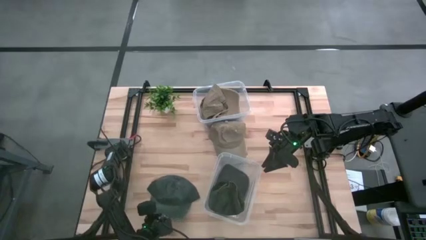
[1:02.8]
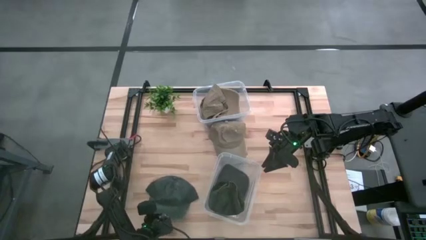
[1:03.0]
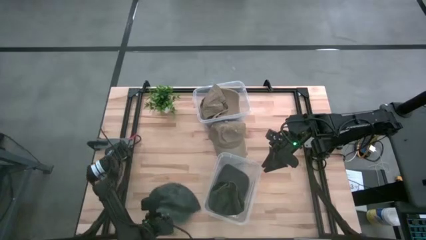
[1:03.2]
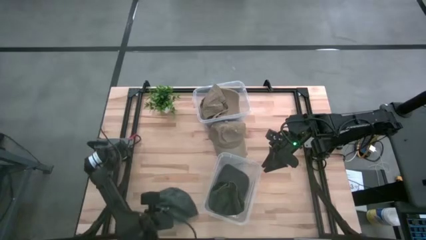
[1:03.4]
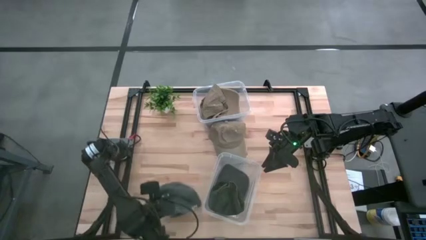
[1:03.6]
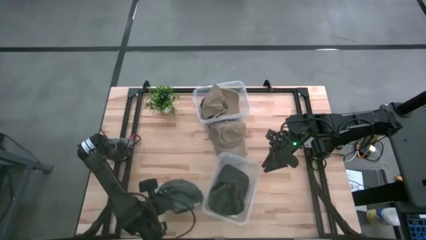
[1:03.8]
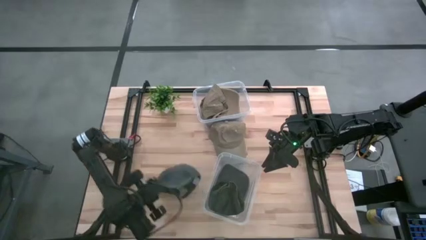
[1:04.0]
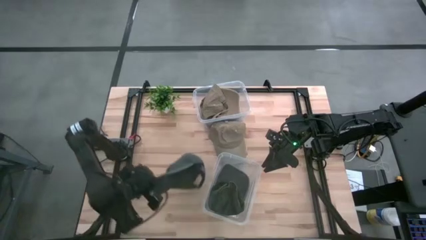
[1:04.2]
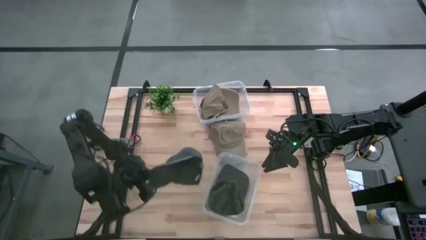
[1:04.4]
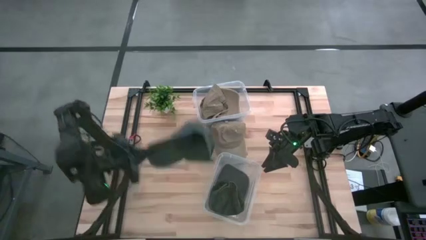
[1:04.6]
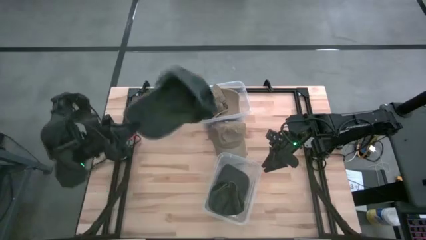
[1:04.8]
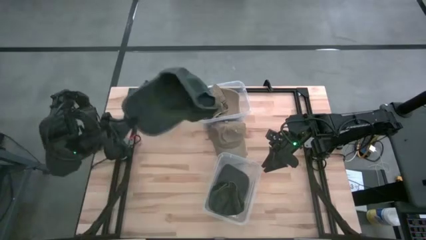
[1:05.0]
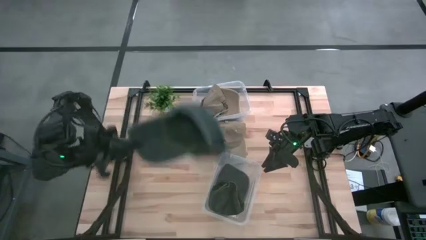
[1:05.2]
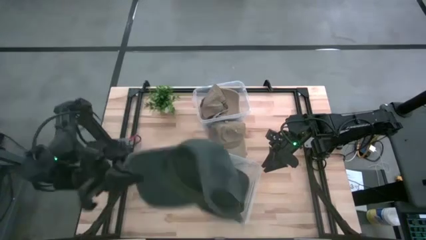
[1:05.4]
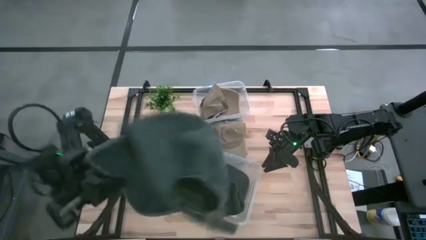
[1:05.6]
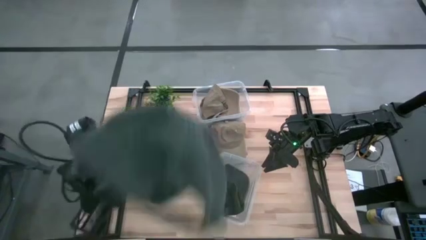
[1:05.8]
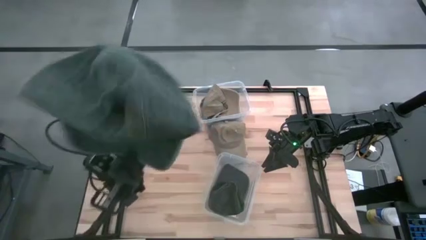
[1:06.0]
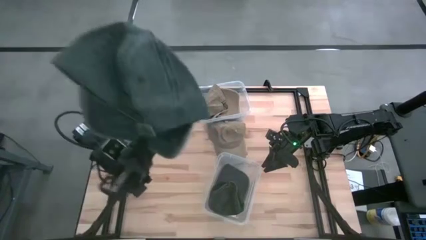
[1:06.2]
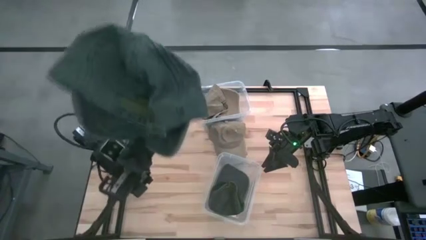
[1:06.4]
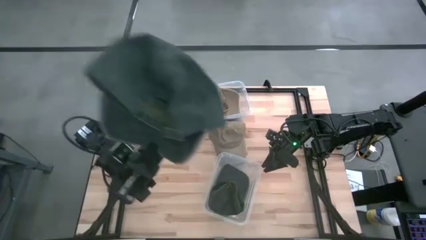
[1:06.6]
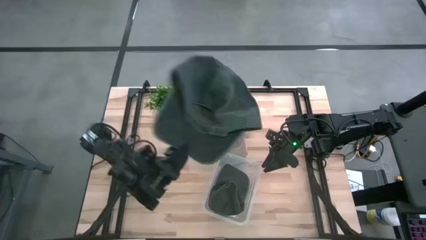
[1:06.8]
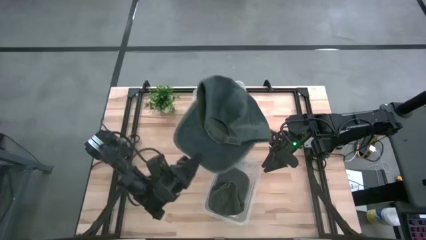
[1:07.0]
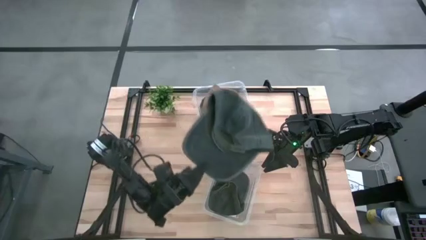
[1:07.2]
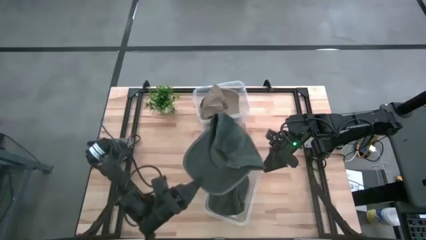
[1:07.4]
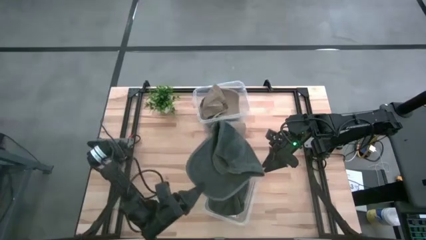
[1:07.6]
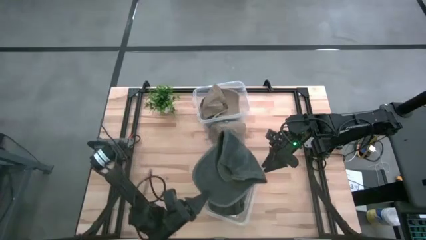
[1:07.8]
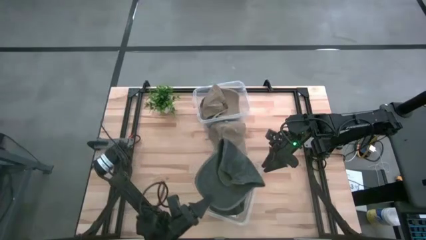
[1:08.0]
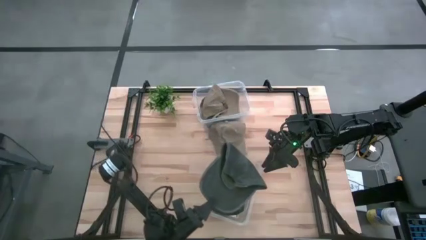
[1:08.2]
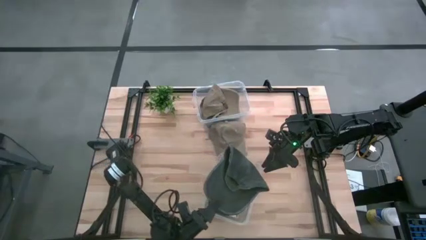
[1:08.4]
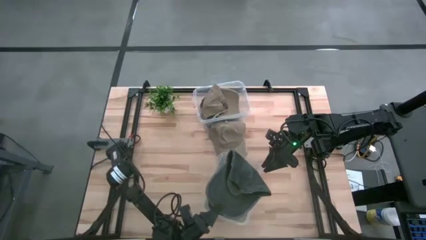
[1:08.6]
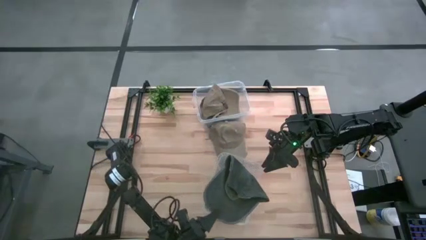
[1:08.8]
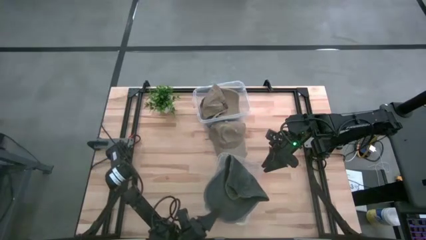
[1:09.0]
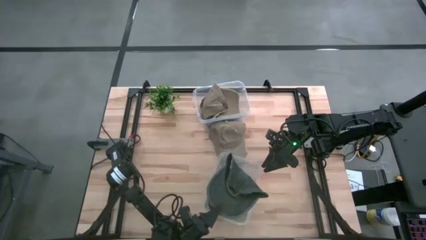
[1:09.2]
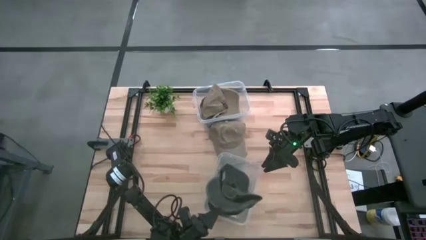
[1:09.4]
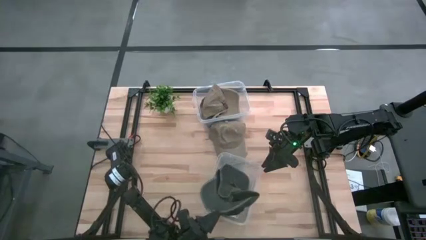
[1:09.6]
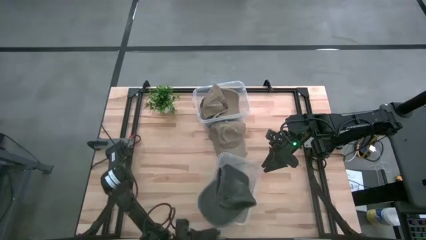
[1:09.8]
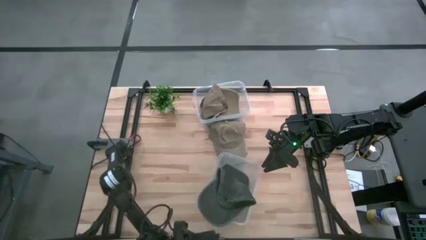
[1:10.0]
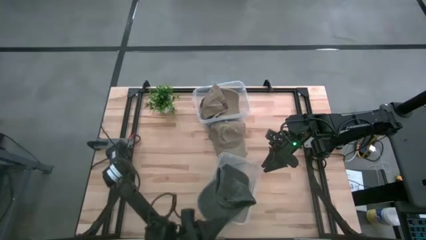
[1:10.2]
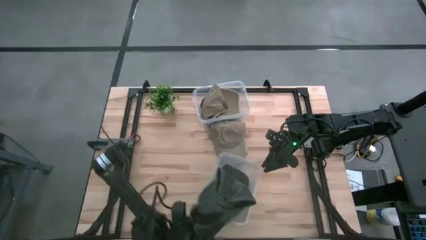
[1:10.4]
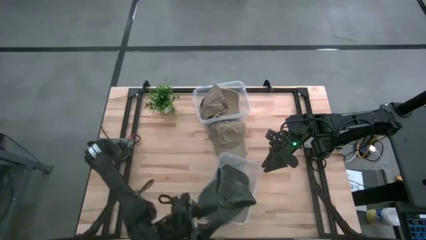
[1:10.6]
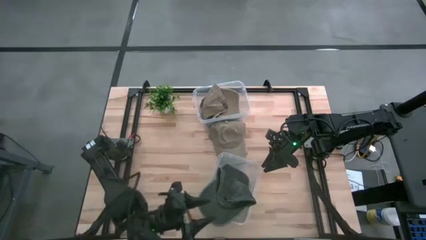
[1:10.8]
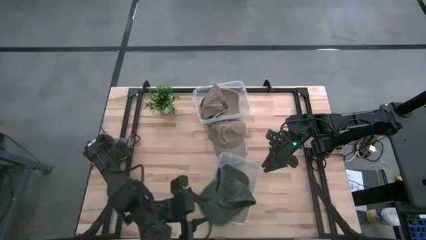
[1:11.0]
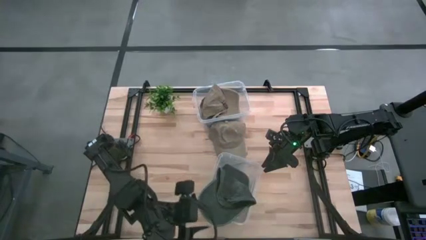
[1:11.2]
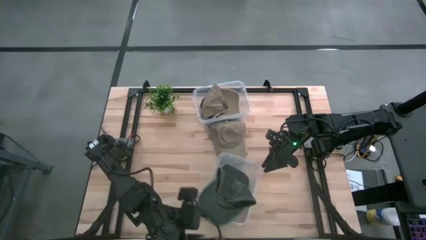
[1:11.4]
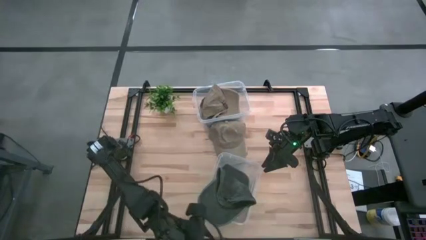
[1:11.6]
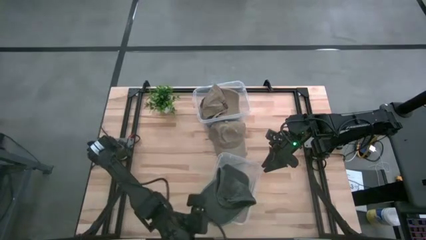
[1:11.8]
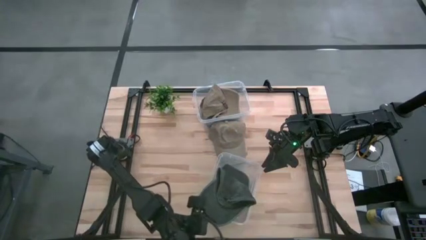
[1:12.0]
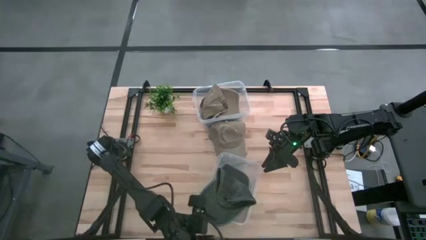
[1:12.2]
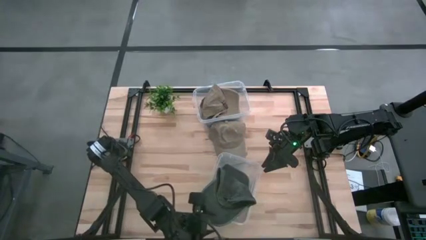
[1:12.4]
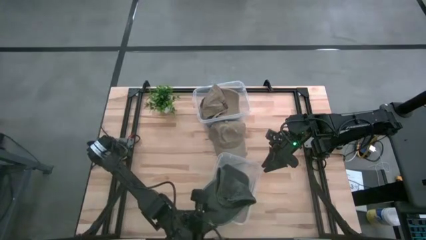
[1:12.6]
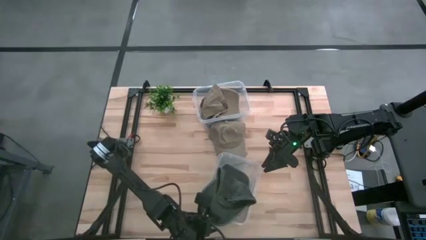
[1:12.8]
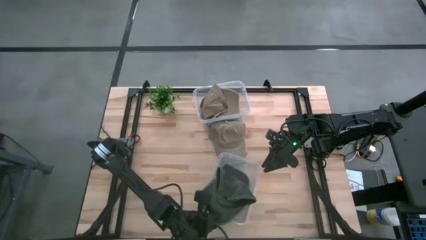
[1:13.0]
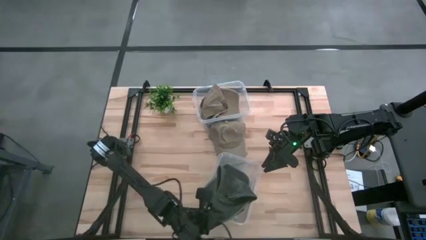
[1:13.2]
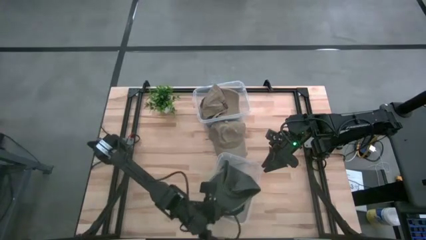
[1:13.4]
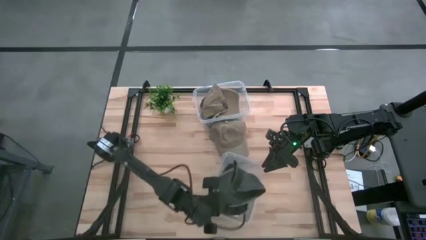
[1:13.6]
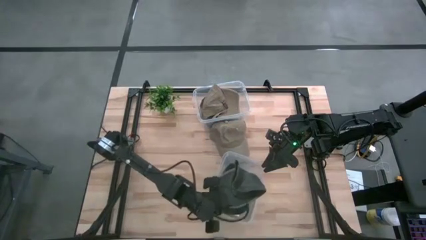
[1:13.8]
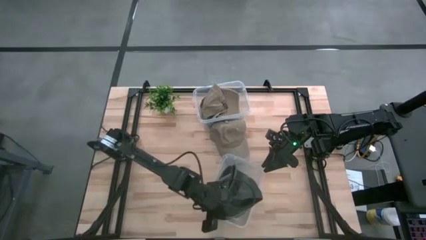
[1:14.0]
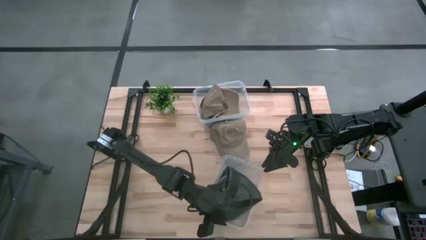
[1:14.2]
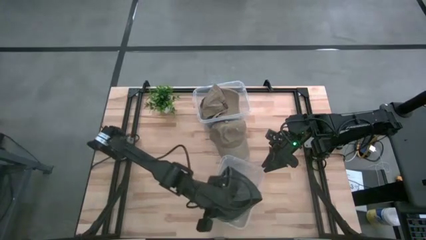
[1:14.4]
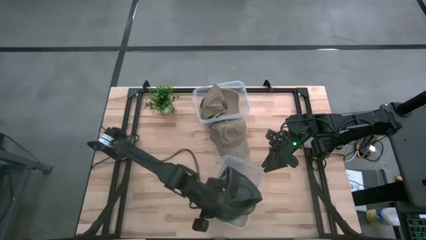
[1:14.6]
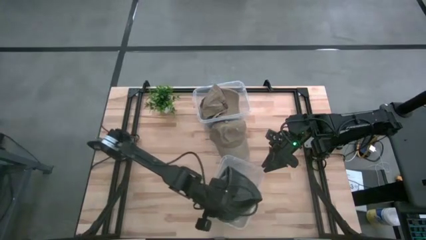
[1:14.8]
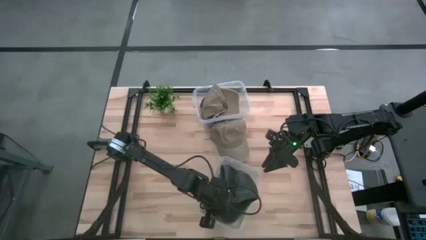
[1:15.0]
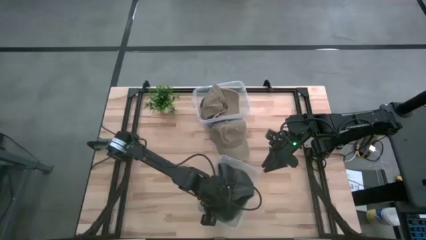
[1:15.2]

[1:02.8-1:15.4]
Task: Pick & Place hat
Put the gray cap into the bottom transparent container

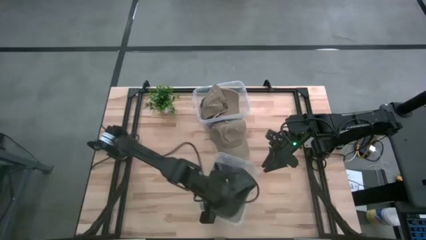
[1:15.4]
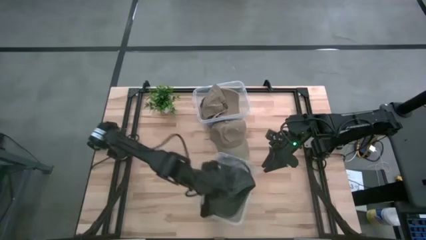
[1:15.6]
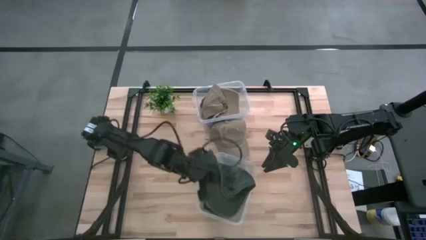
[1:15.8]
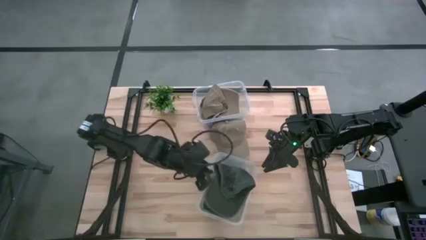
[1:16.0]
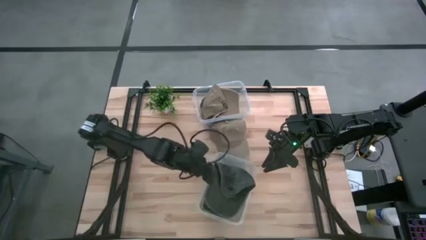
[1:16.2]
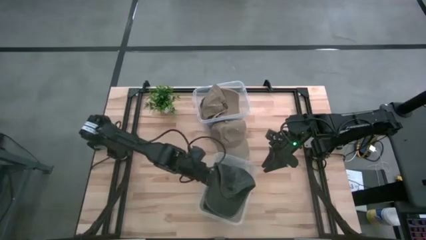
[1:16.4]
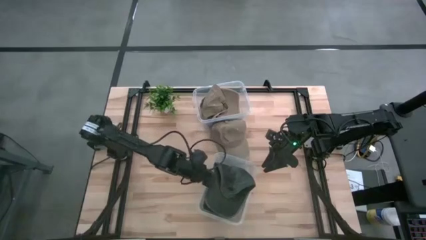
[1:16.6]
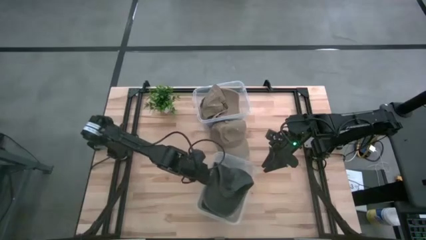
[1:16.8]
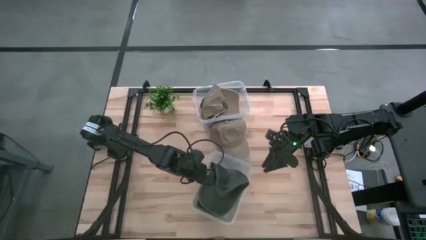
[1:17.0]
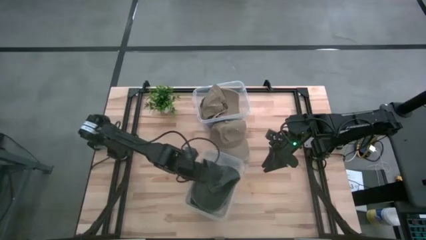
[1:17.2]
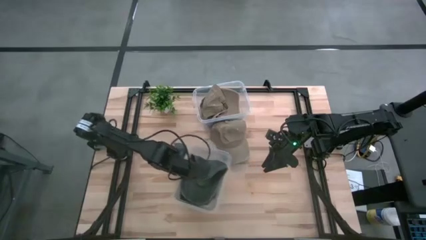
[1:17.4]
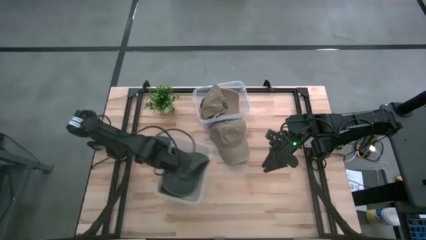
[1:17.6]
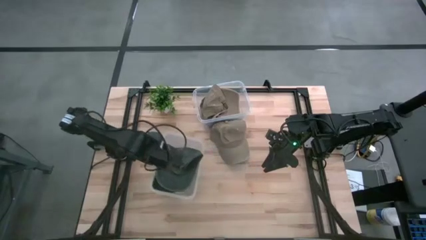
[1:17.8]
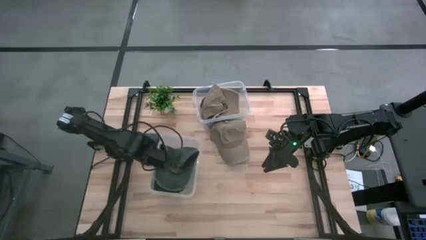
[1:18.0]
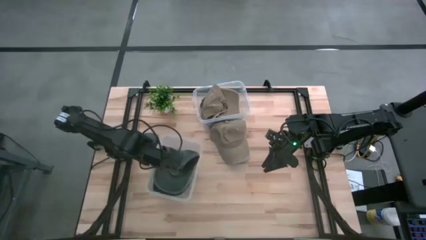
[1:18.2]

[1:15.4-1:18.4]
Move the bottom transparent container to the middle left of the table

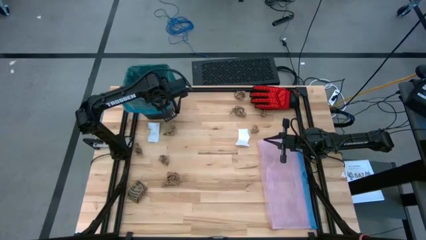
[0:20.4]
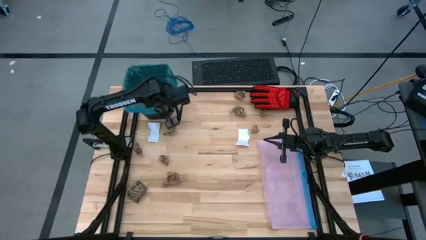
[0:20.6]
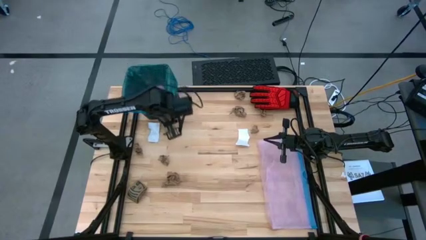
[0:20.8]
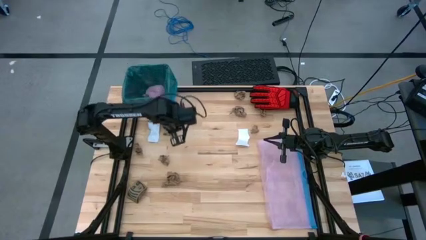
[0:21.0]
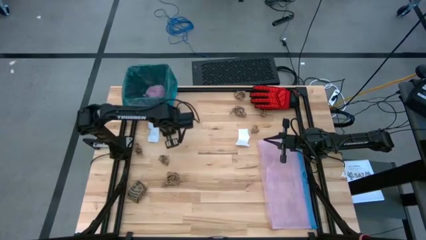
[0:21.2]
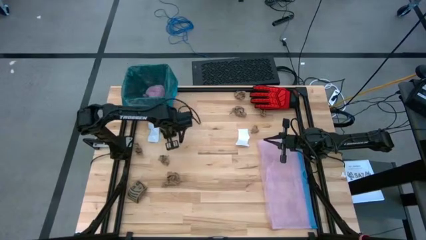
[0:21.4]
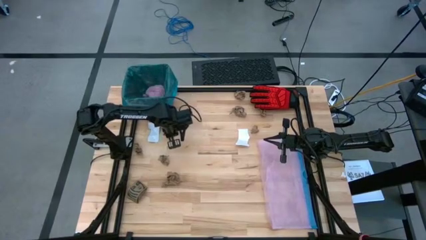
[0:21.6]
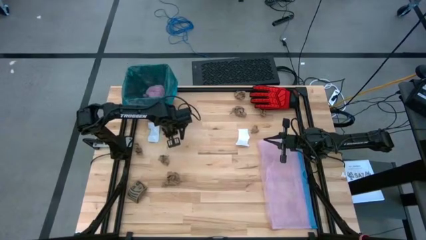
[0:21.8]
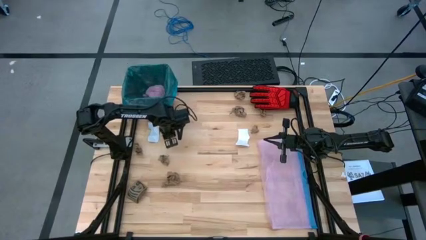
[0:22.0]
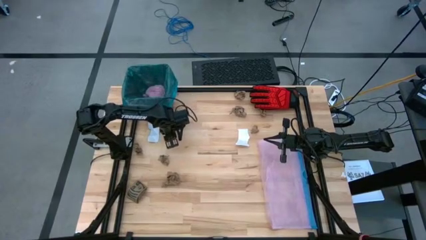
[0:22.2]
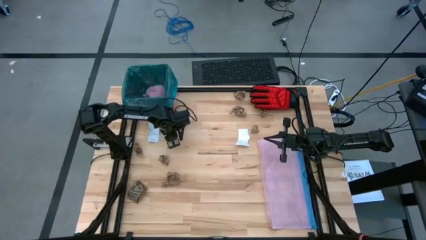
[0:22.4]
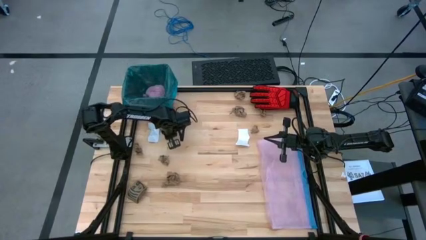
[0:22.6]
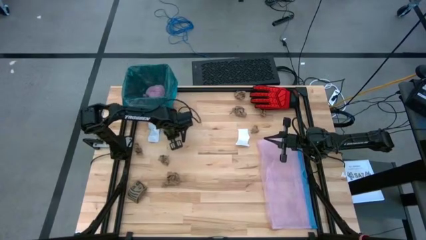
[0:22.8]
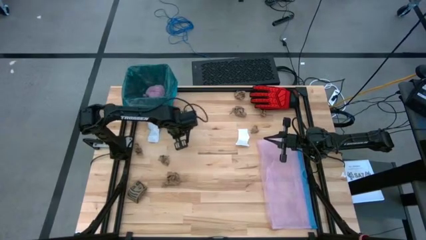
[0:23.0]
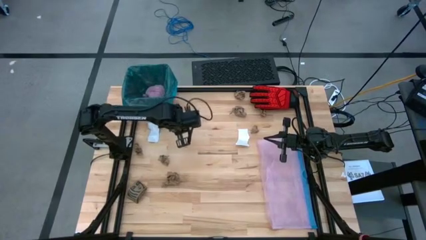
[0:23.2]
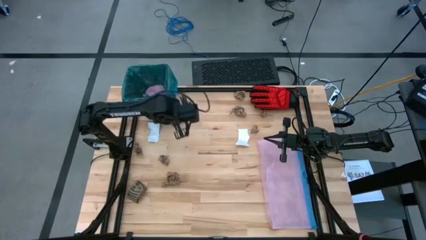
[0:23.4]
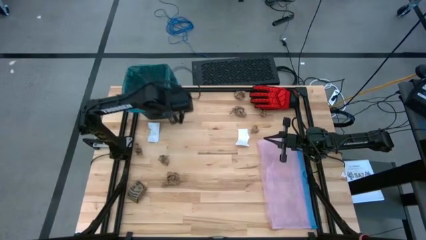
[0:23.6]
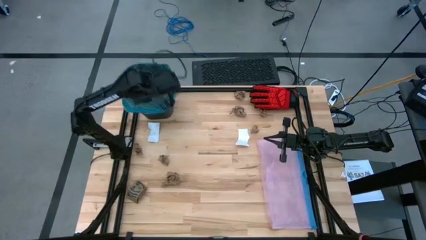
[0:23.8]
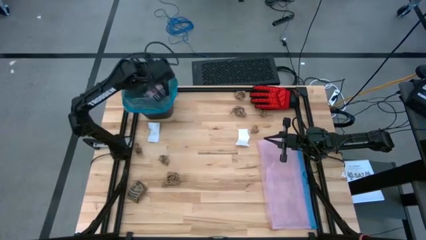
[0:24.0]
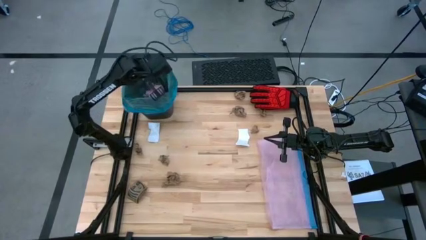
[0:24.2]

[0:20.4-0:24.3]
Task: place trash/remove bag and relplace
Put the brown napkin into the black trash bin
